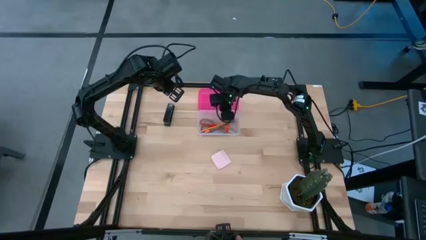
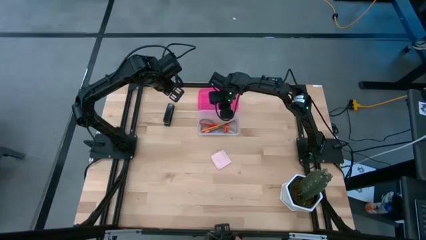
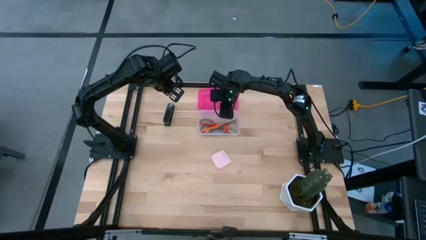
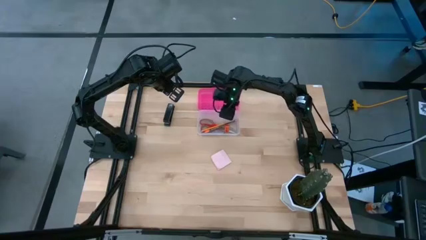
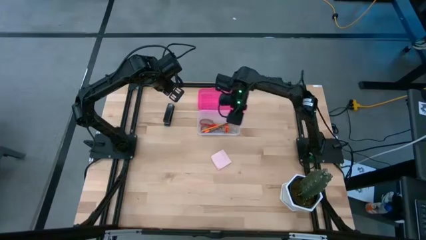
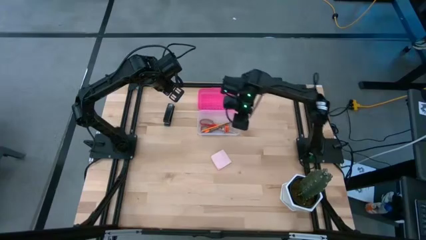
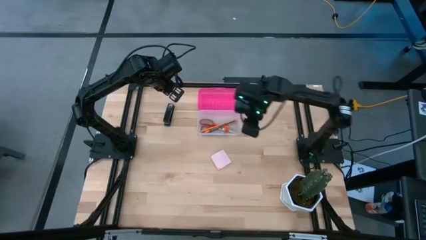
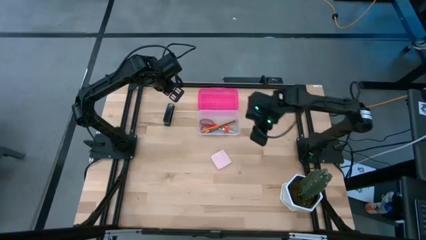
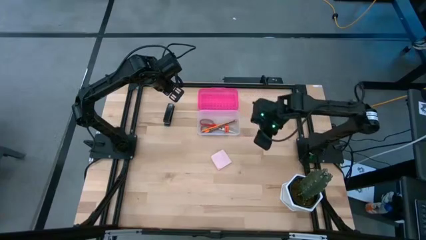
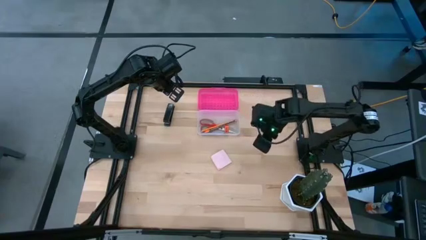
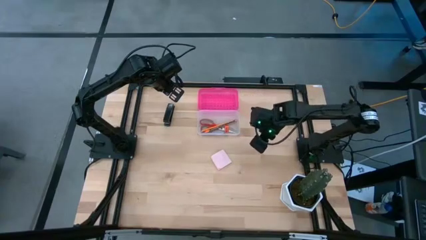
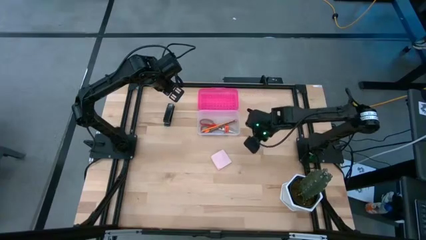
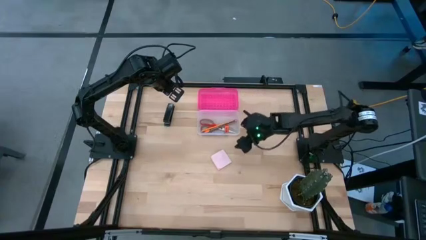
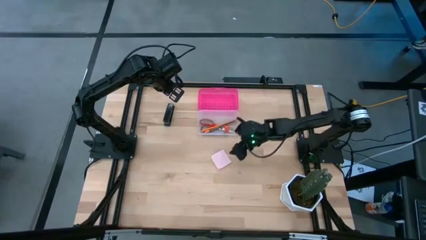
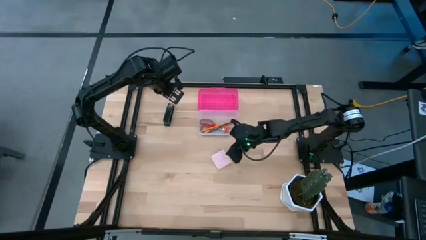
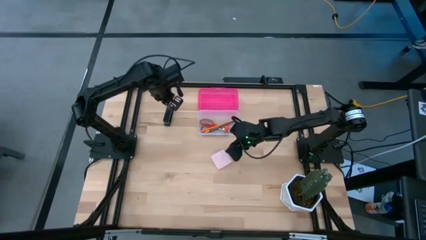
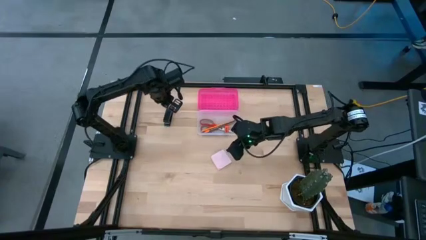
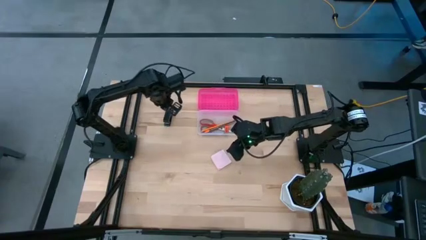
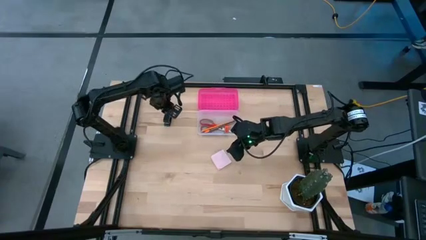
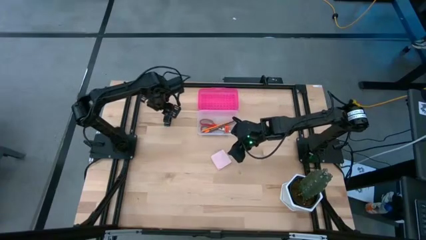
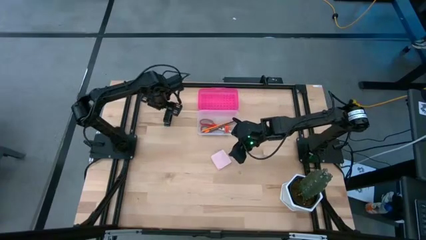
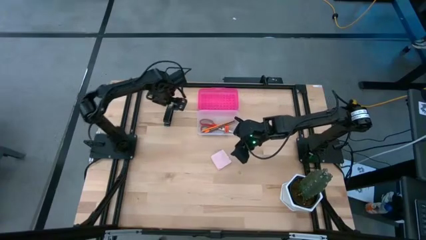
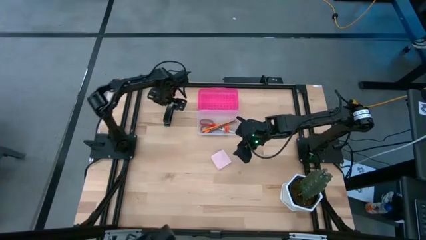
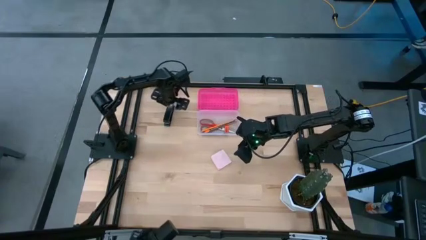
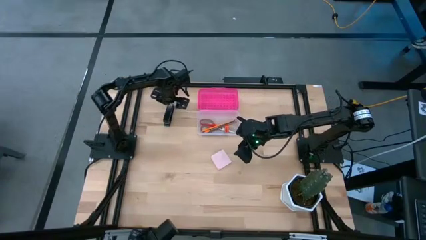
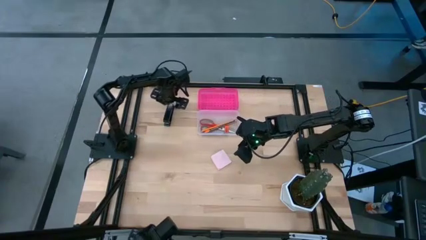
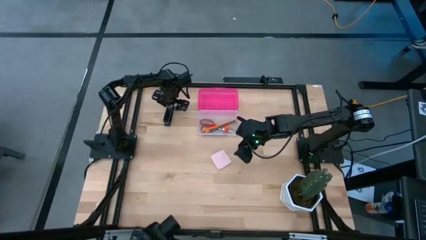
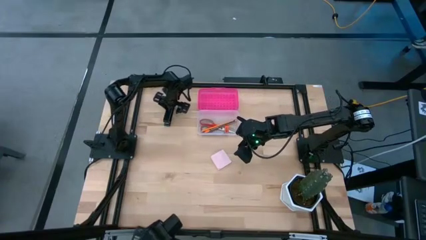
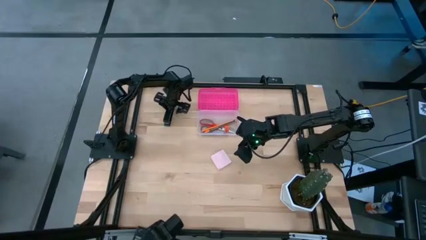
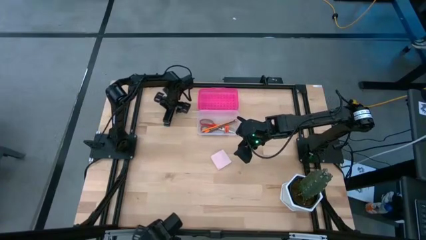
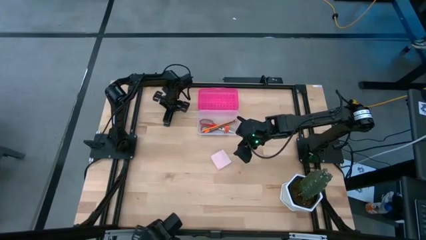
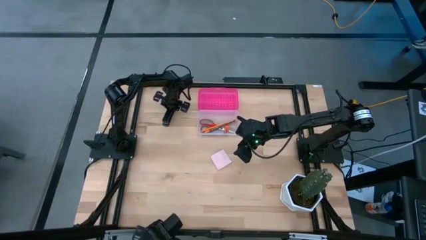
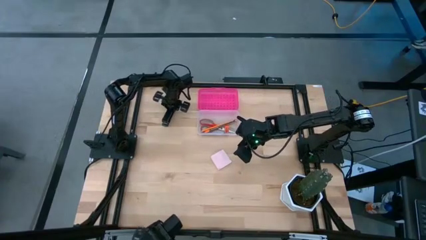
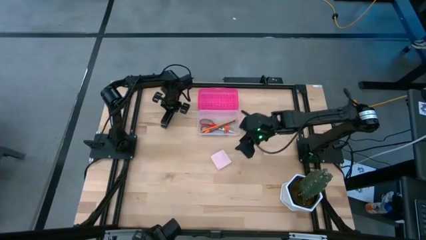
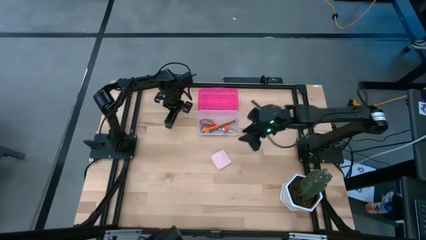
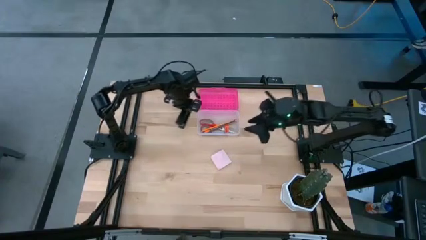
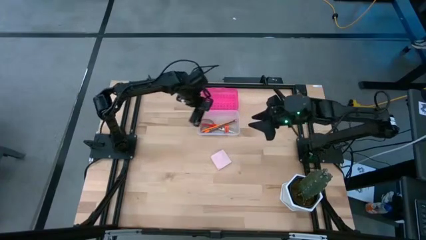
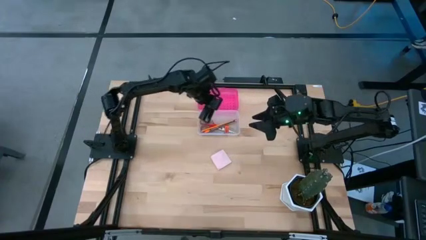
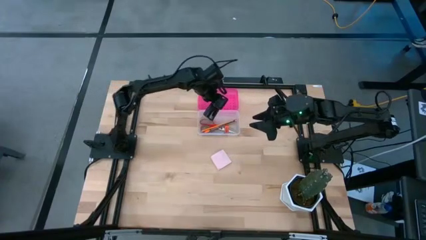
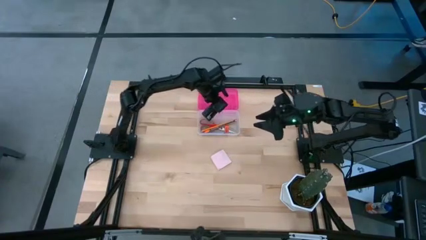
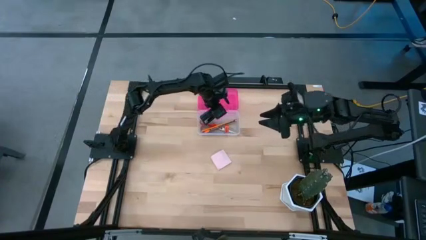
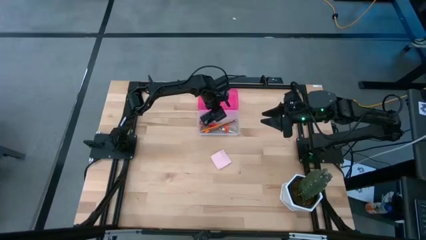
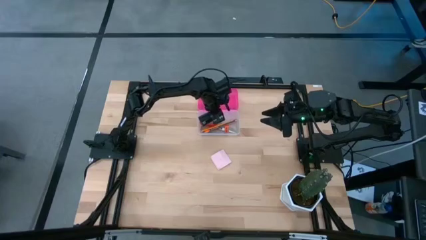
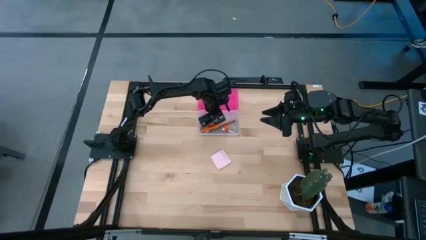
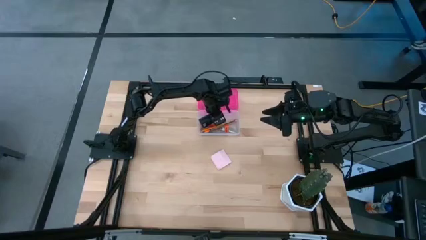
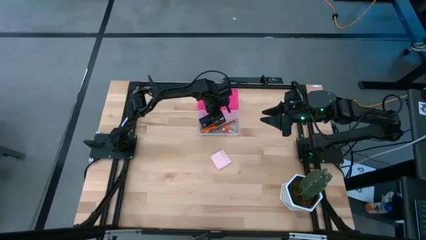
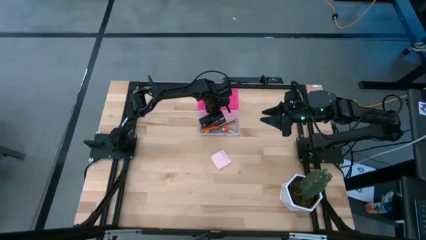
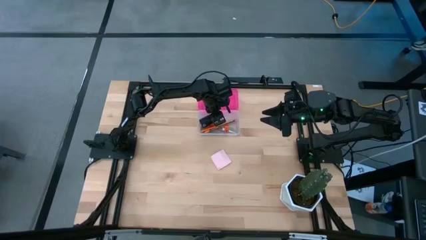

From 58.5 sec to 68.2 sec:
Task: Pack school essentials
Put the black stapler into the supply box

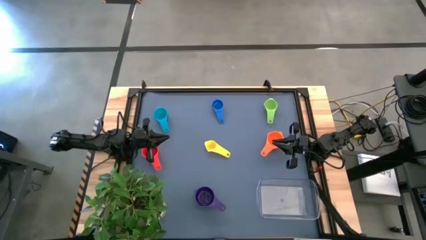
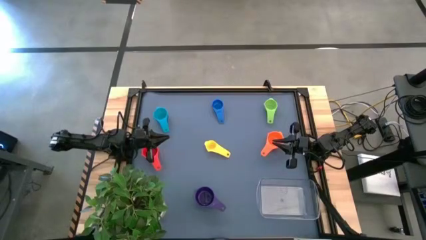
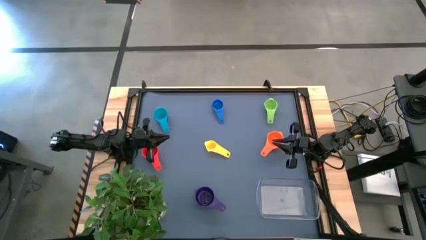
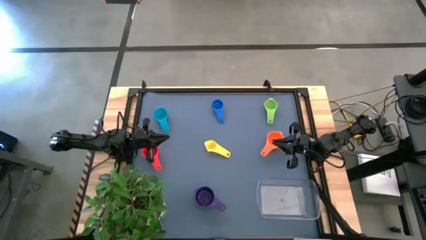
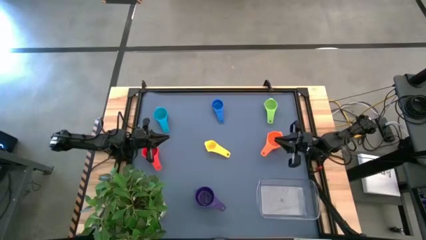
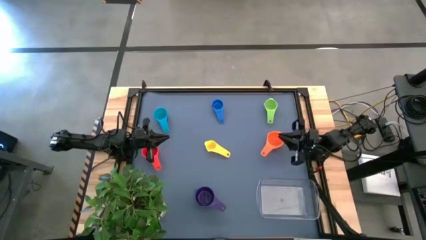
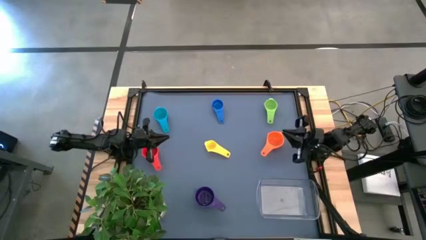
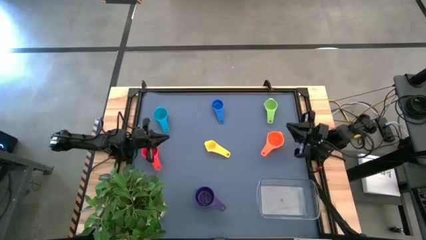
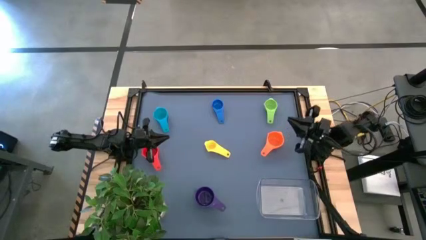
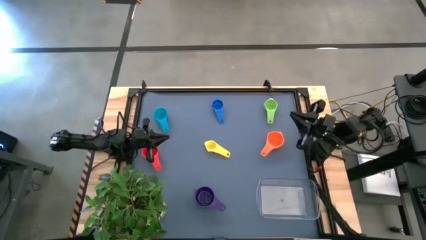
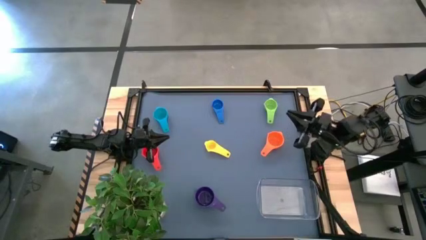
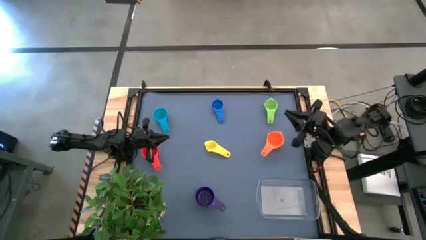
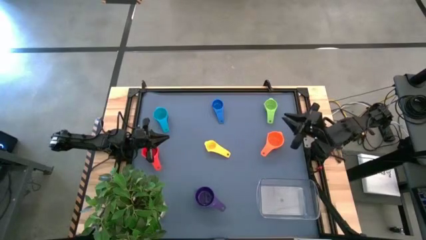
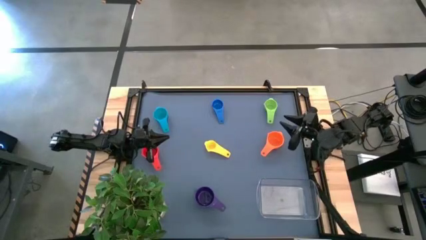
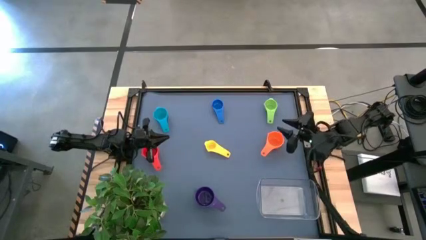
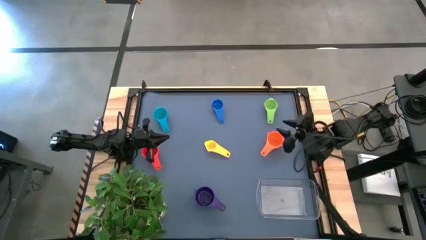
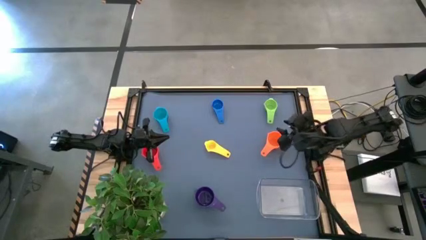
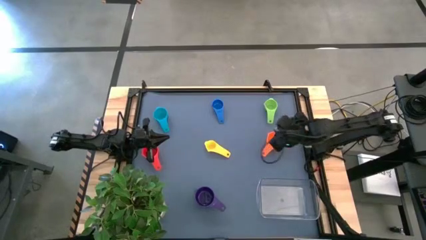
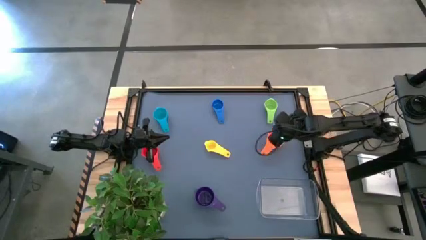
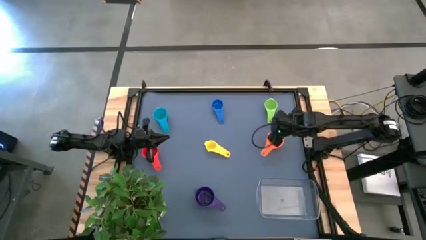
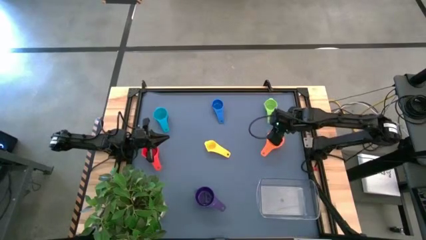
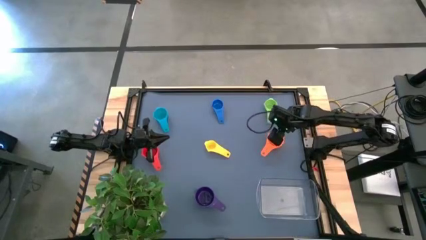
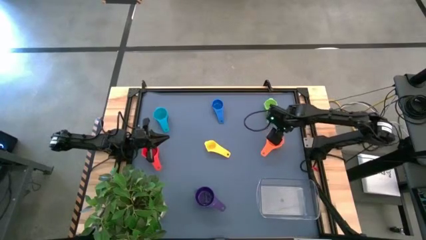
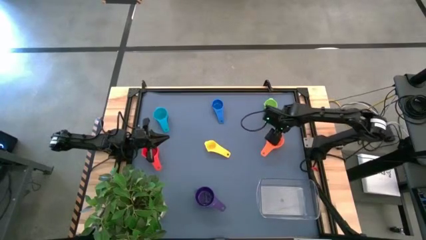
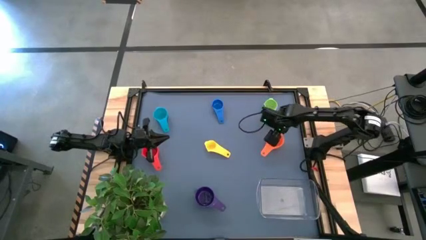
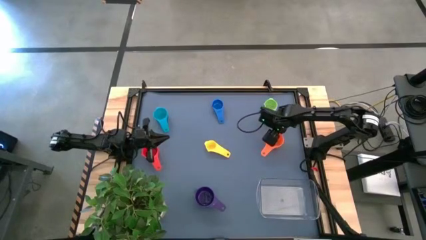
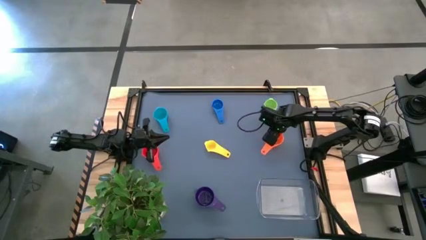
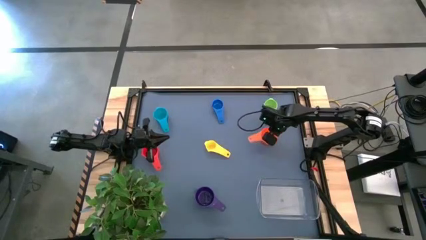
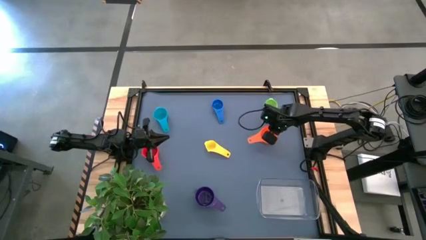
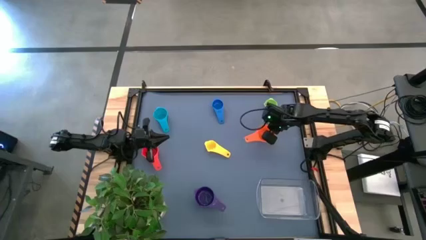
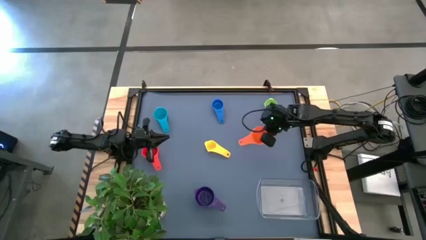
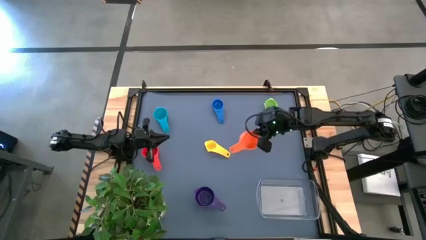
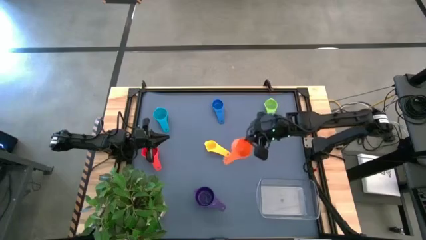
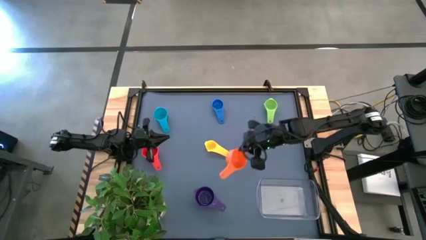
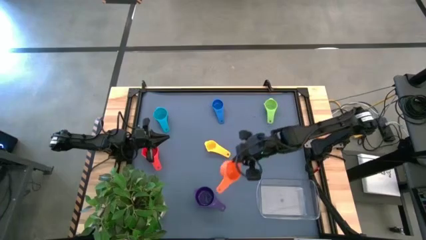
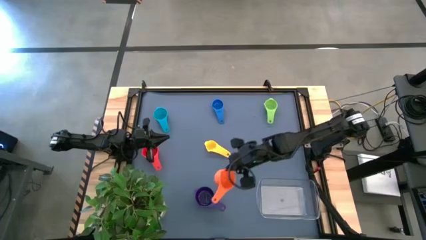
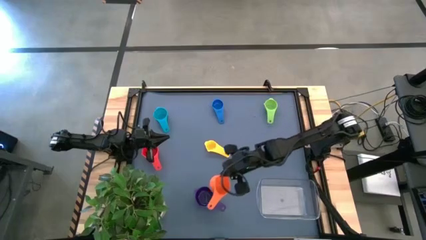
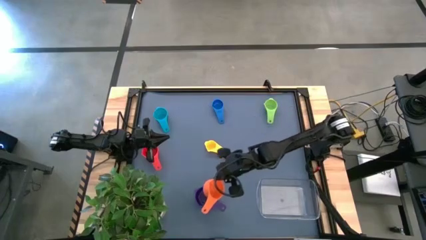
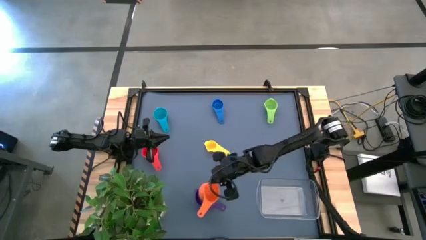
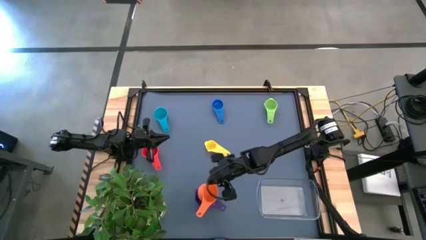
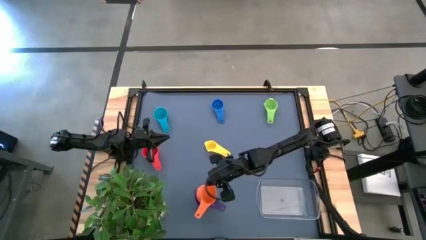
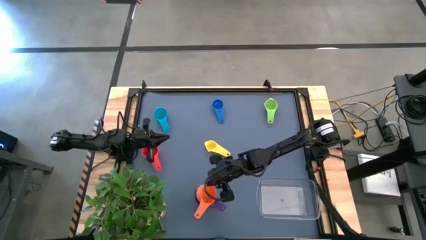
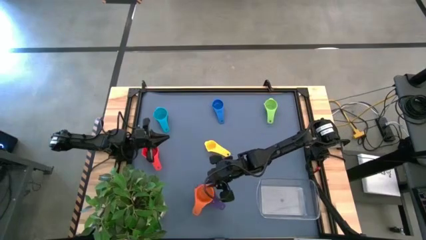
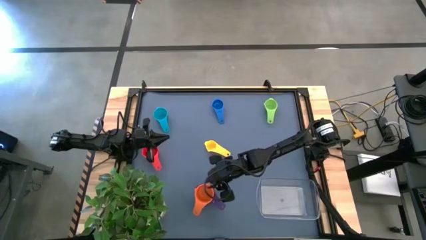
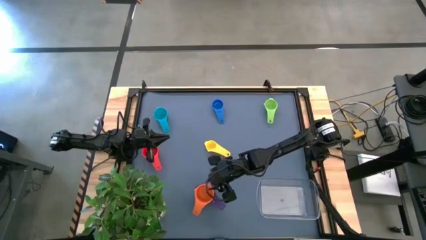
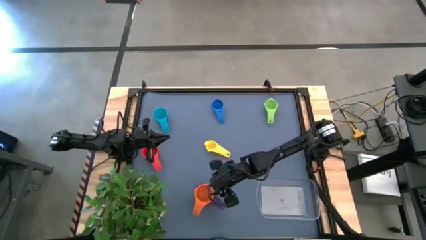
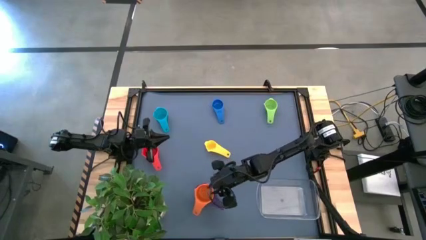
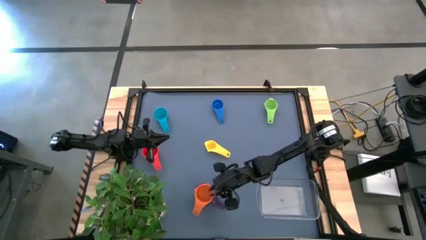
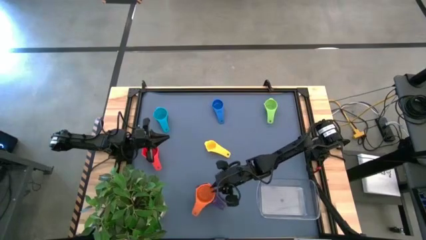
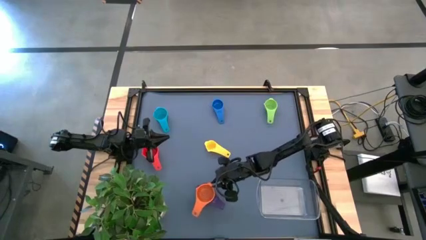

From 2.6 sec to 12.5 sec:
Task: Nest measuring cups in basket
Stack the orange measuring cup on top of the purple measuring cup
